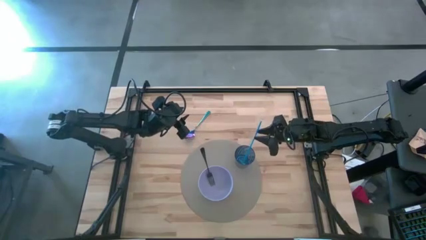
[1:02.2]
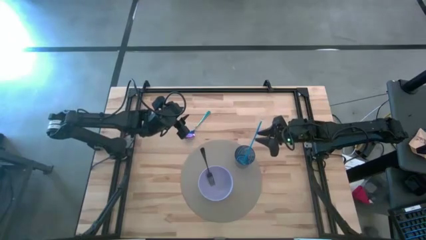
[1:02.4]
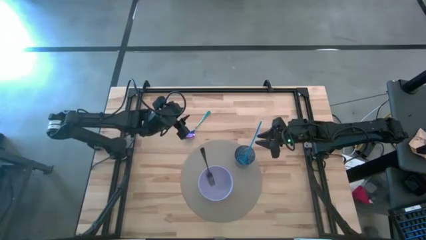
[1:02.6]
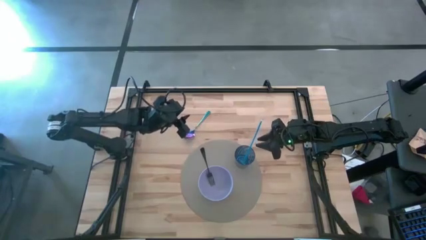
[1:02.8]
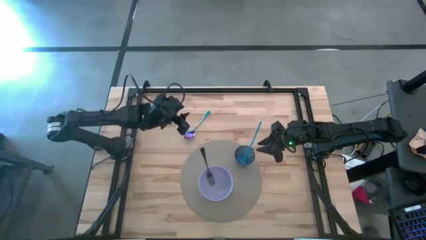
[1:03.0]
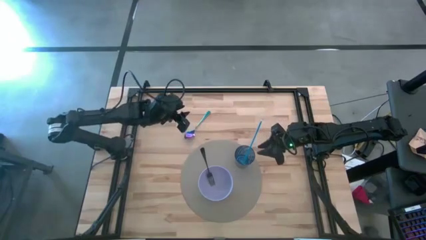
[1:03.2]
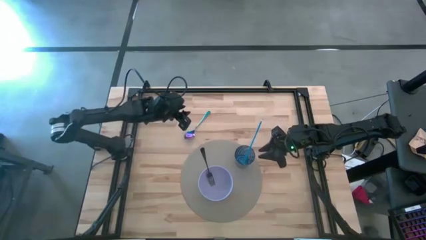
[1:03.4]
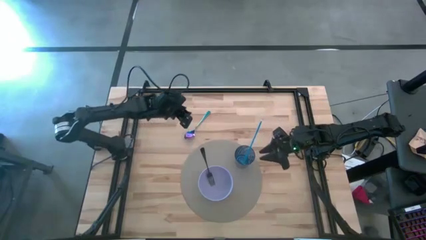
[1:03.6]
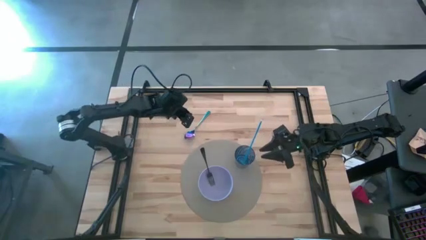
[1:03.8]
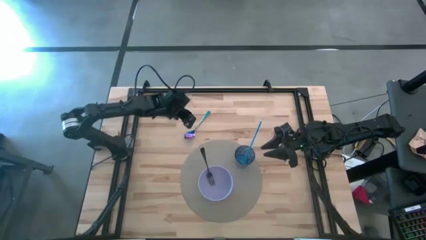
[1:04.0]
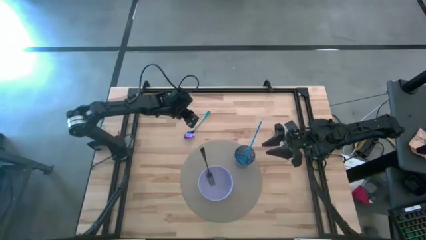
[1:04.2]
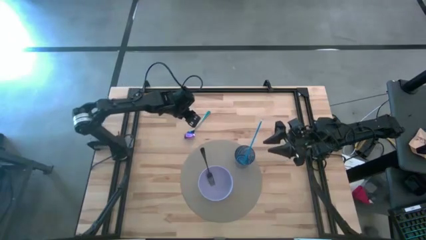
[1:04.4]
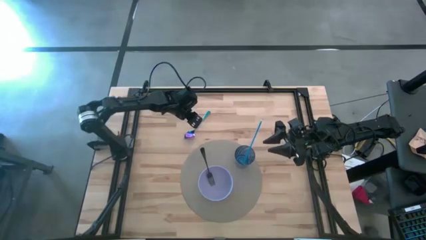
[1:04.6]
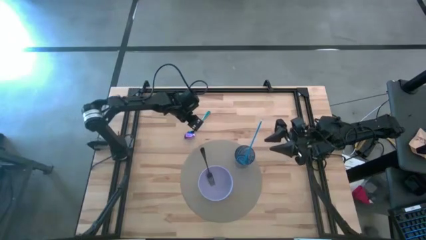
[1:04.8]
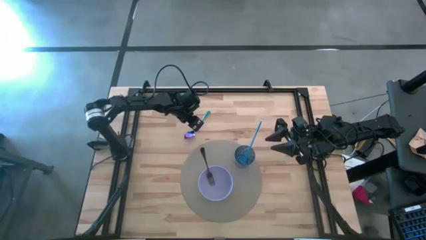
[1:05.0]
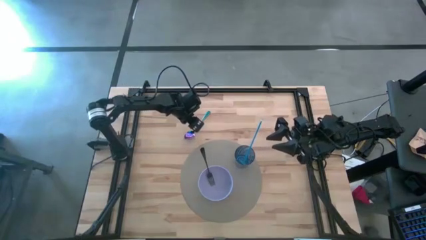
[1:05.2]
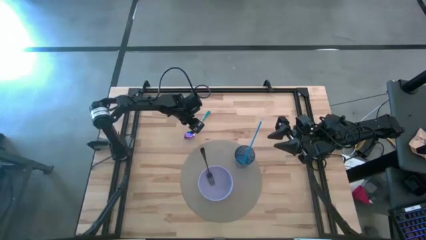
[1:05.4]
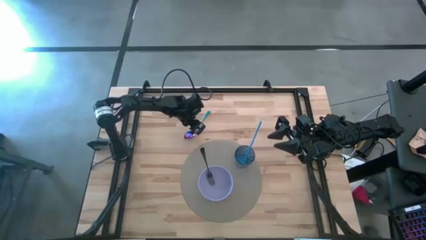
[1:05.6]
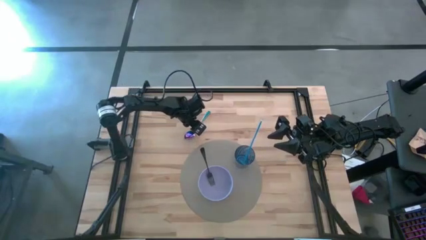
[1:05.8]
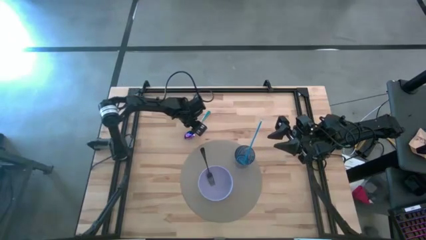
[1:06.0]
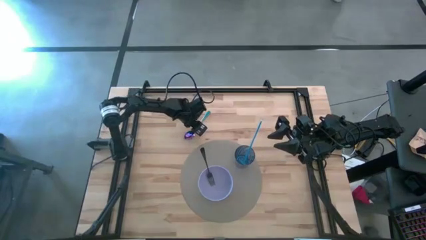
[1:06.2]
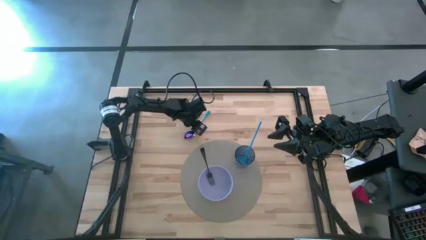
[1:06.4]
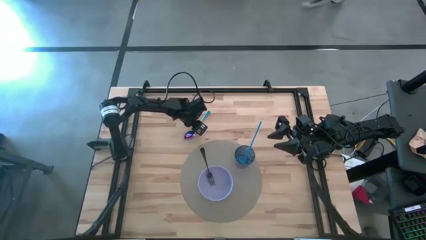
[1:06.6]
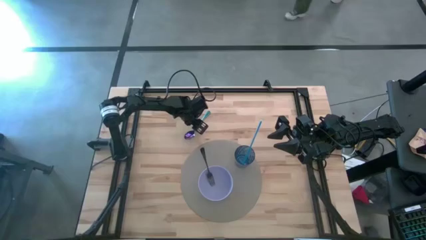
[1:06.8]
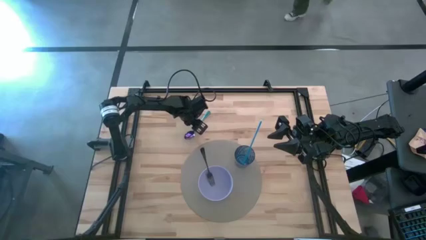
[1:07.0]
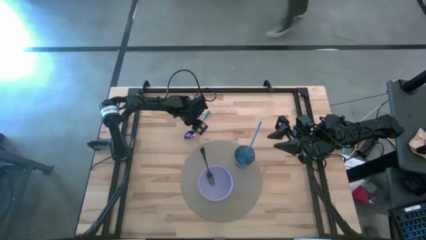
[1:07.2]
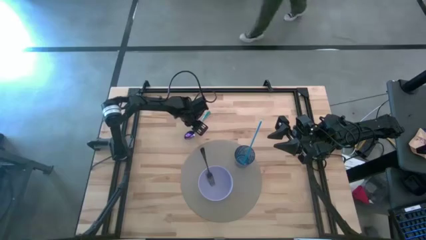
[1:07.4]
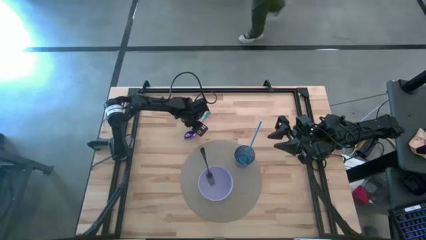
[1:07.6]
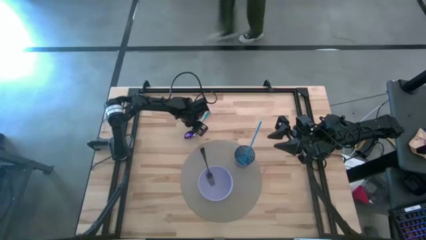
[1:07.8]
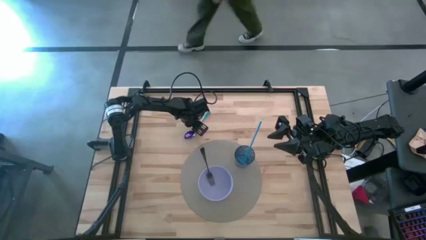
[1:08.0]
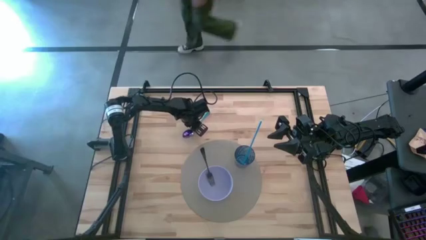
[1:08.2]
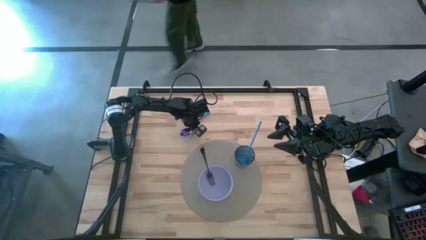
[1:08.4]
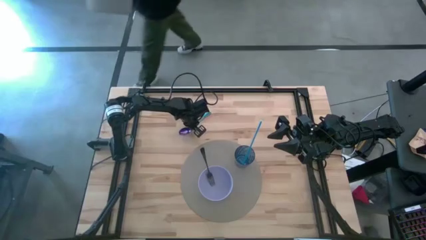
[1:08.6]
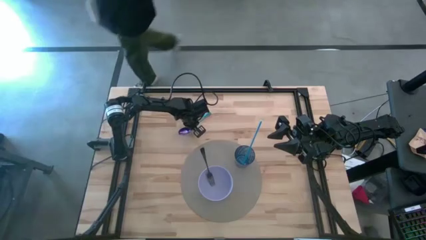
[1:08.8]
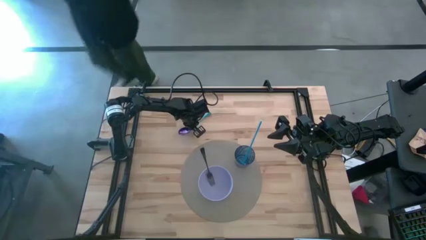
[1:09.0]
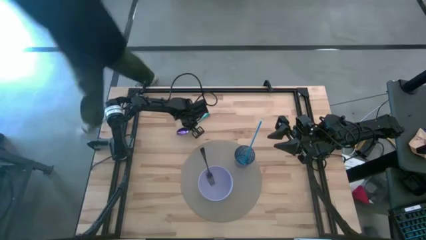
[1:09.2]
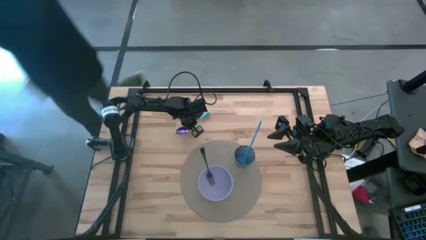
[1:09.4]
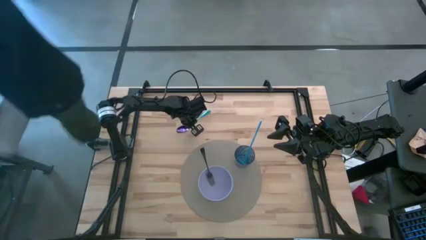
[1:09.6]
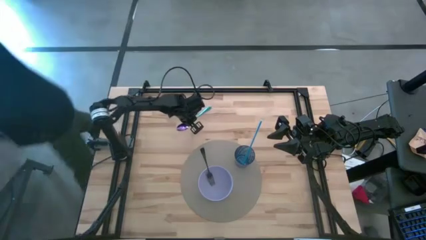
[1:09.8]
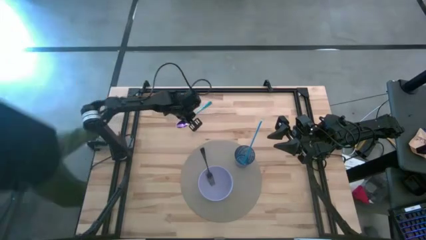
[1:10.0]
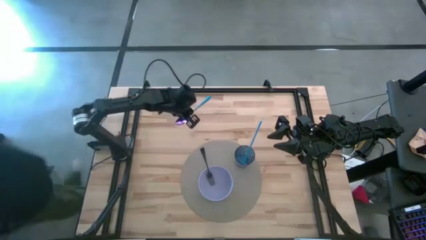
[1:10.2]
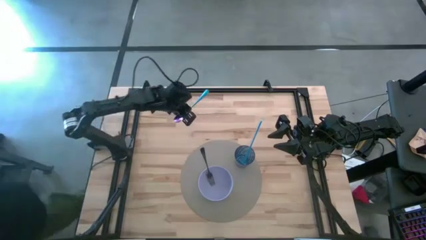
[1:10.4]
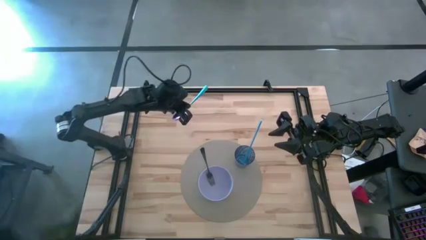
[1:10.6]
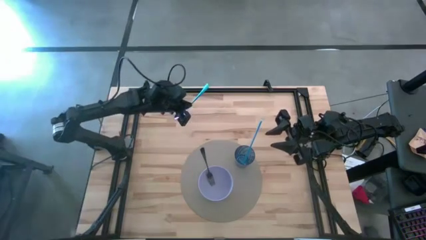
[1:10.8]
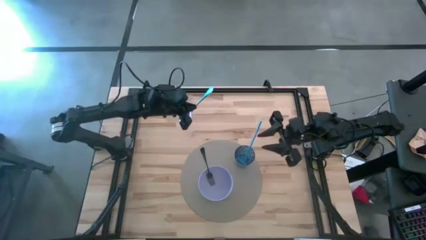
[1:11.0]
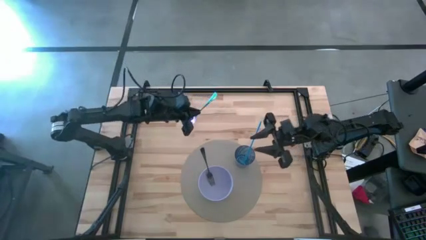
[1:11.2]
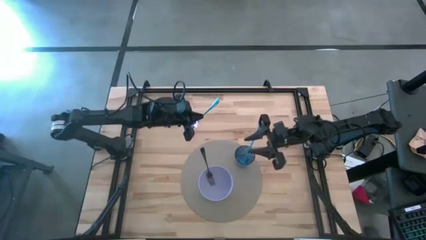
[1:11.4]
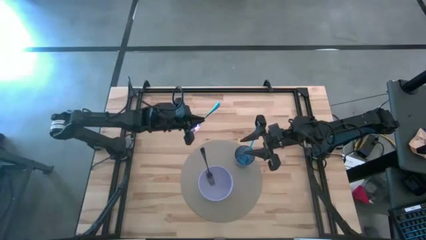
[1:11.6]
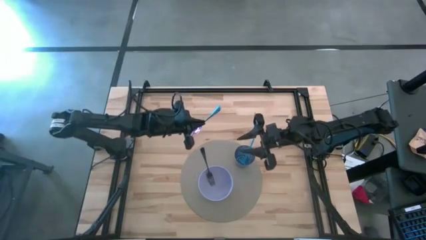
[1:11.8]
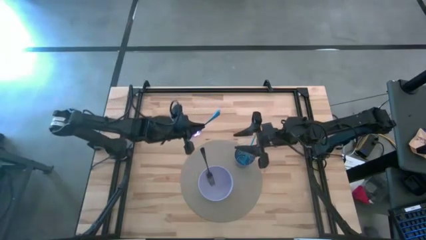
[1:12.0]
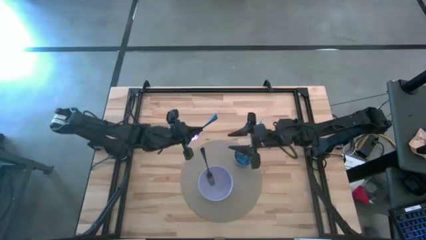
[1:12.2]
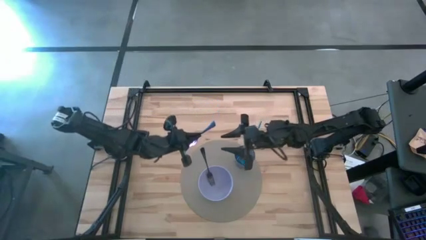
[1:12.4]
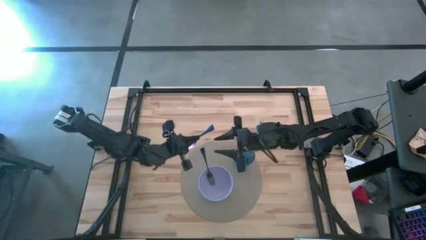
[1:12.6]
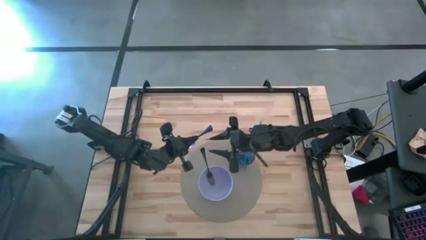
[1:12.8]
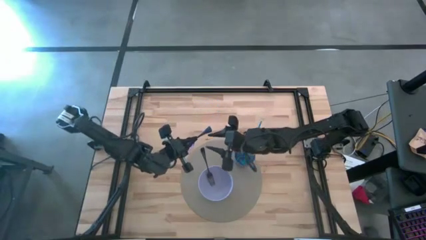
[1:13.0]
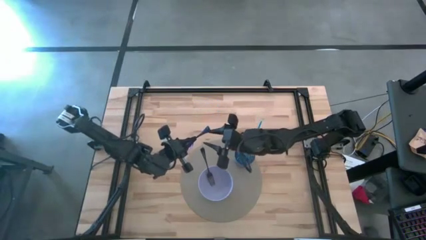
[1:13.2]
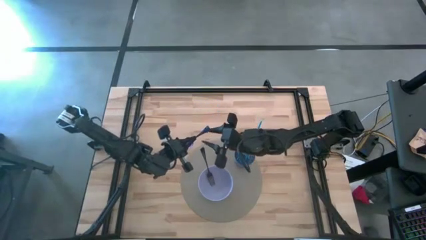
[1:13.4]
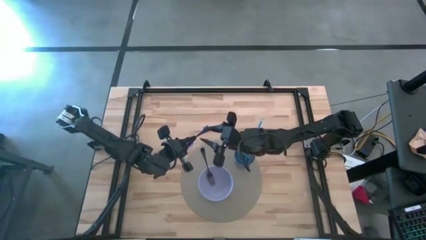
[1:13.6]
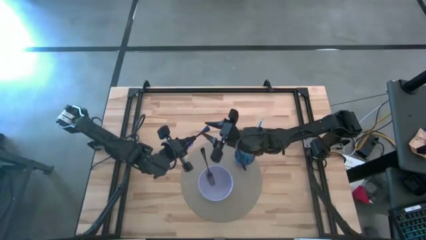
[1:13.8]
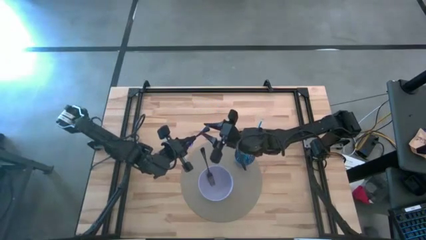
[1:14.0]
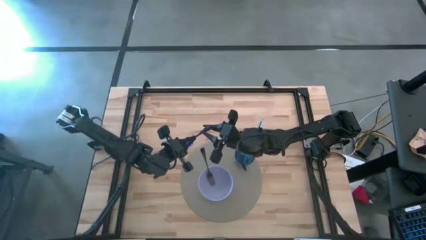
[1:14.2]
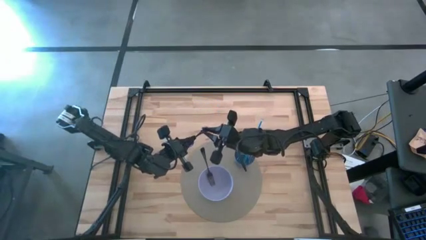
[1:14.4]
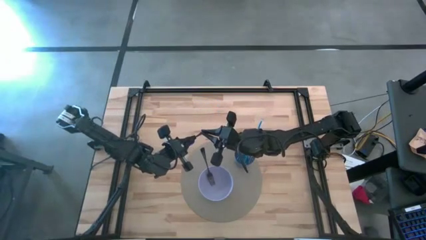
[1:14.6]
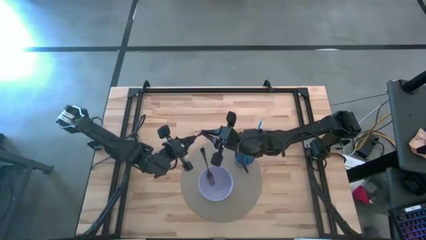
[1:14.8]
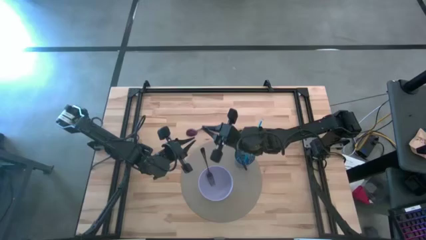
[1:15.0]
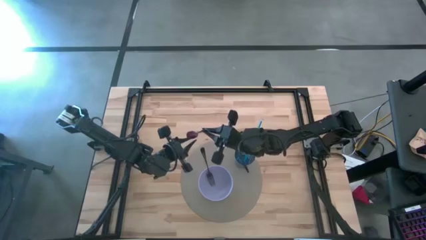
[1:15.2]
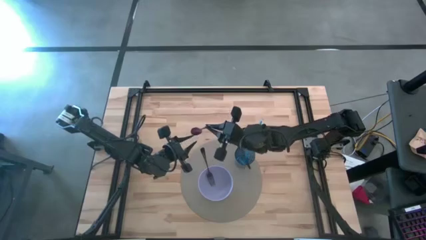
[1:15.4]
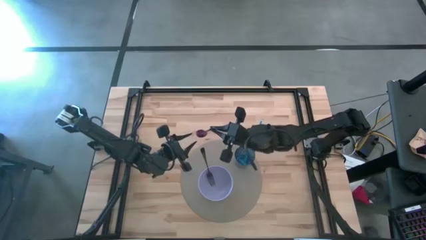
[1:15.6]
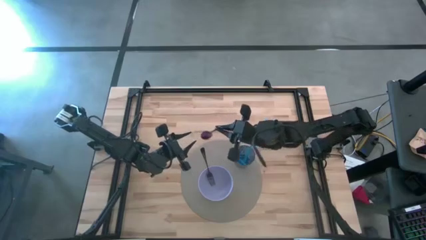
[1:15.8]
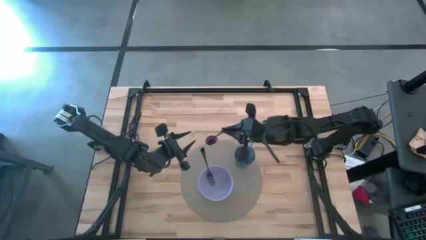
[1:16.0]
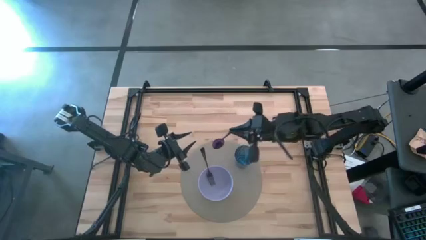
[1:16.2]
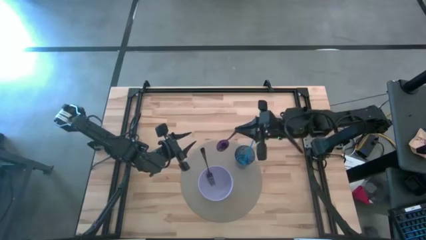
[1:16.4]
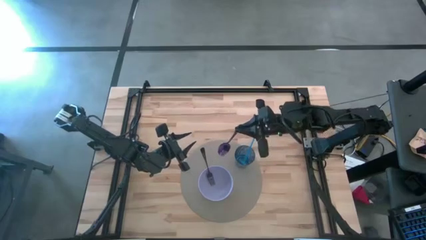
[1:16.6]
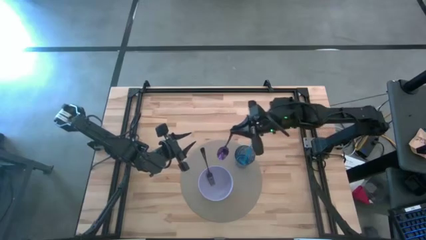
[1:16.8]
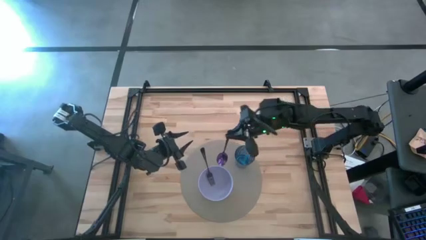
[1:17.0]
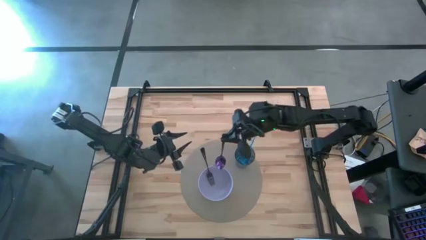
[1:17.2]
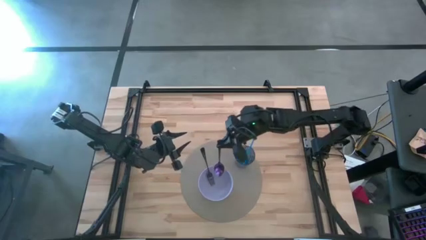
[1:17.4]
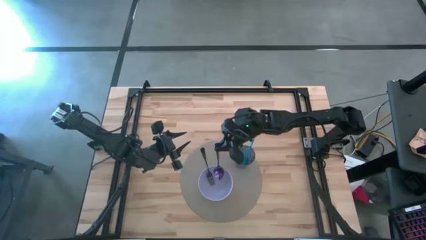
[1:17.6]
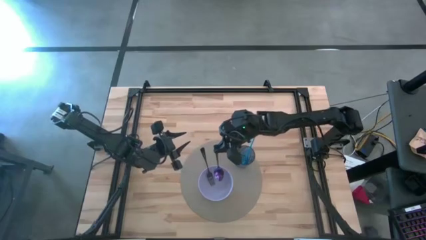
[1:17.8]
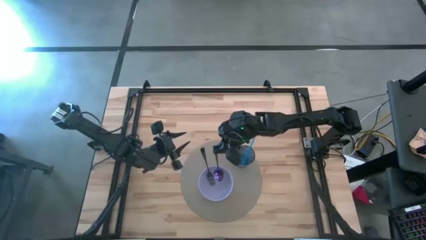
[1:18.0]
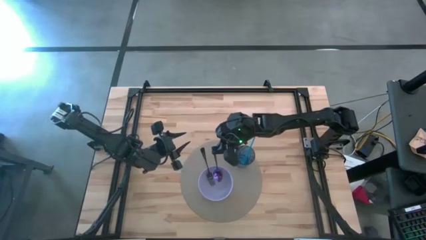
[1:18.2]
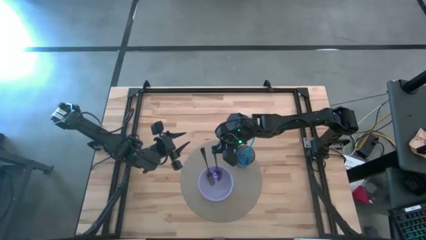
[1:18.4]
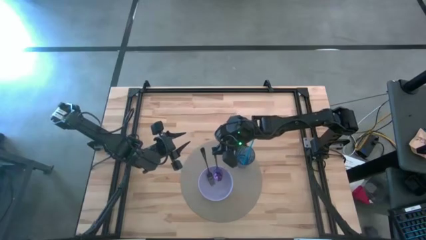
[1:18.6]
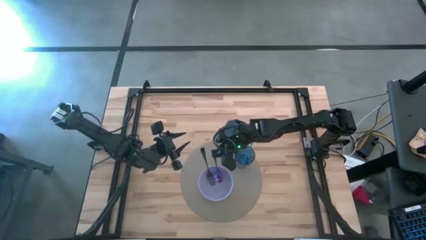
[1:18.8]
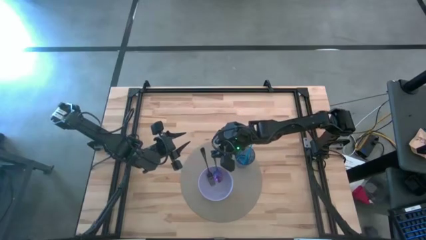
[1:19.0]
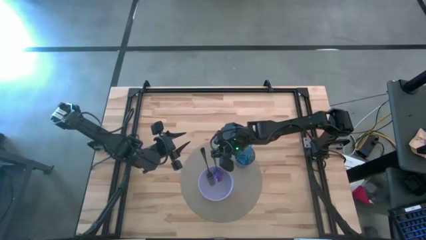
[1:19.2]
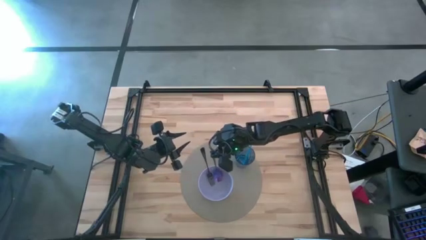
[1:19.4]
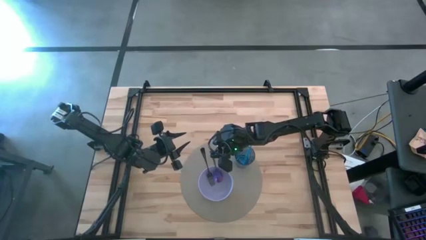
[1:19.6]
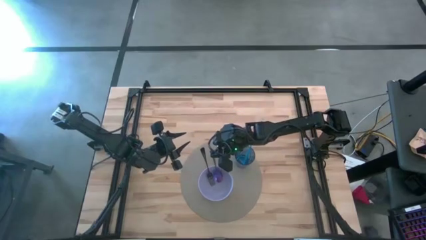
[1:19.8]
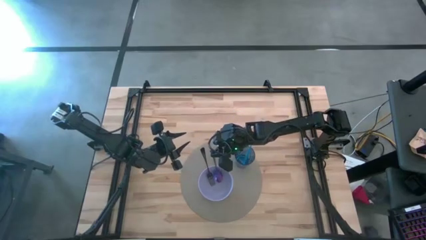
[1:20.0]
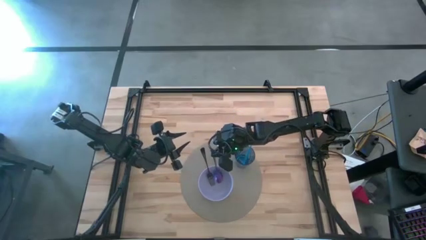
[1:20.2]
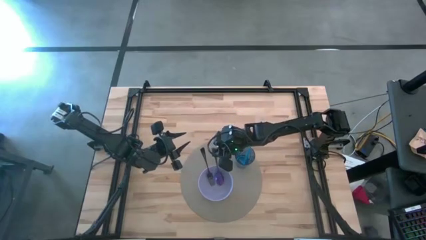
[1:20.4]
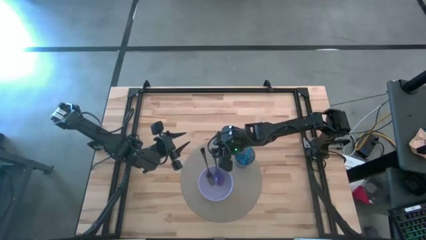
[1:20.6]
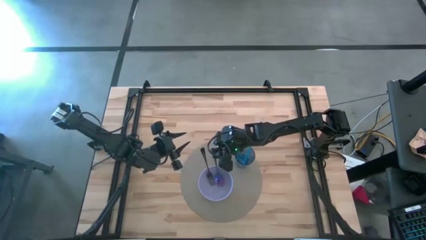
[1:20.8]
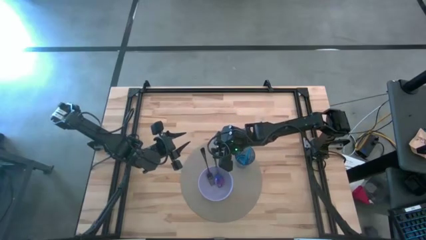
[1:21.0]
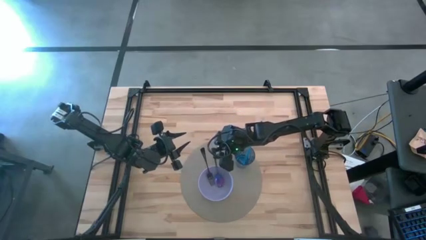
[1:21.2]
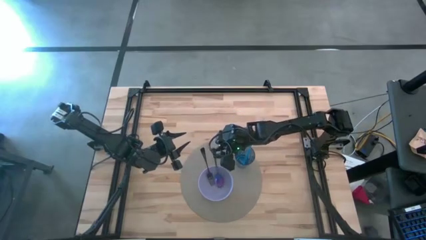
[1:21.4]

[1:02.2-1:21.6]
Task: Pick & Place Utensil
Put the spoon into the bowl
